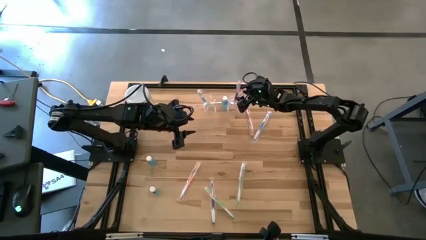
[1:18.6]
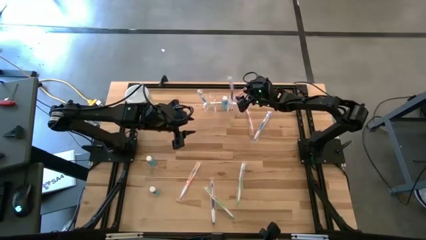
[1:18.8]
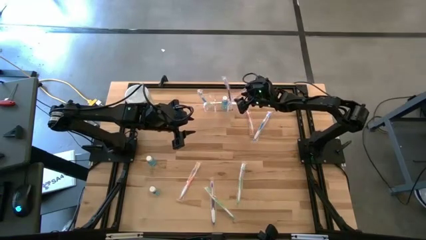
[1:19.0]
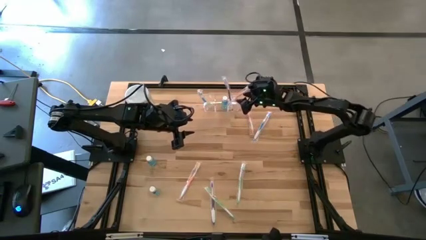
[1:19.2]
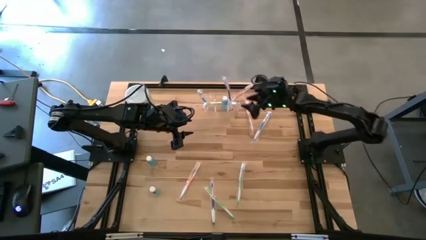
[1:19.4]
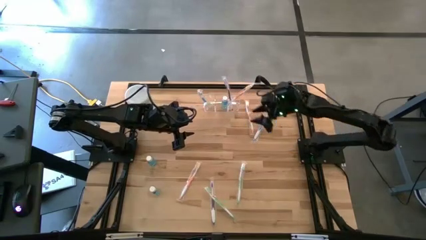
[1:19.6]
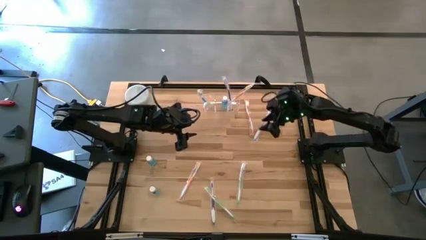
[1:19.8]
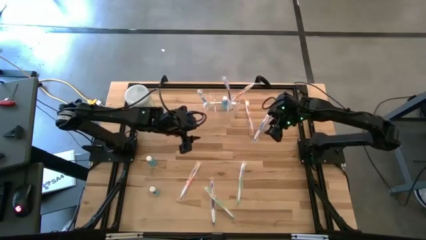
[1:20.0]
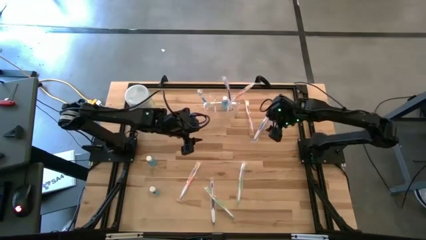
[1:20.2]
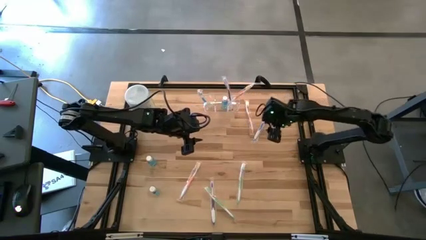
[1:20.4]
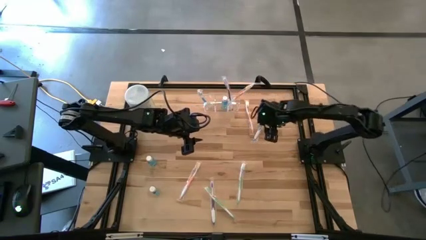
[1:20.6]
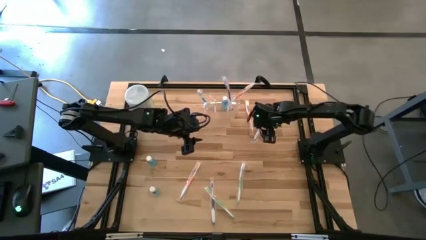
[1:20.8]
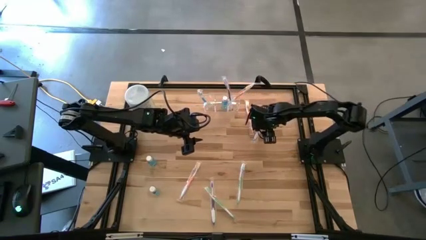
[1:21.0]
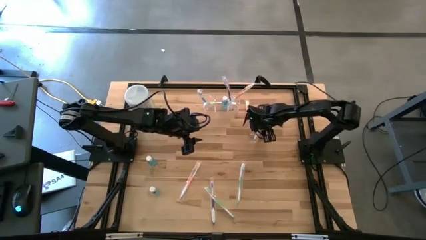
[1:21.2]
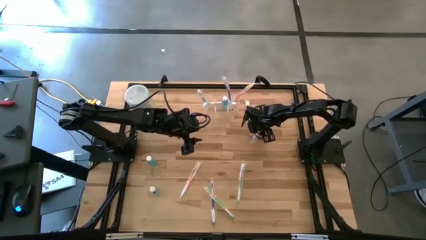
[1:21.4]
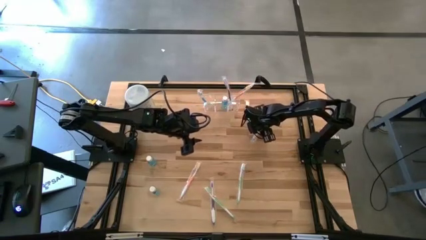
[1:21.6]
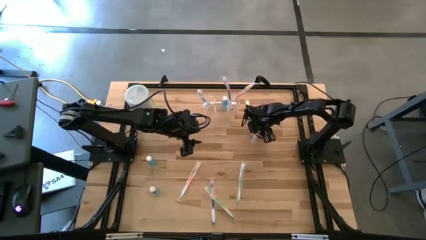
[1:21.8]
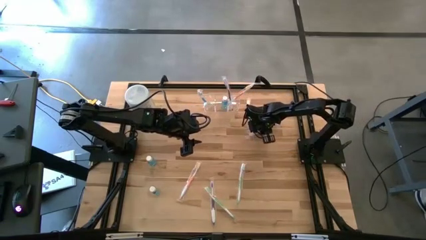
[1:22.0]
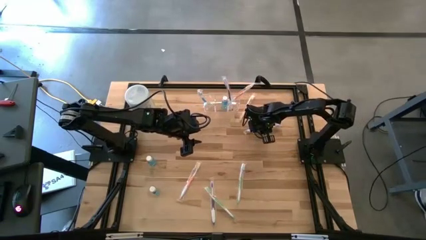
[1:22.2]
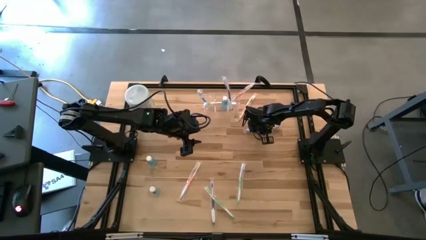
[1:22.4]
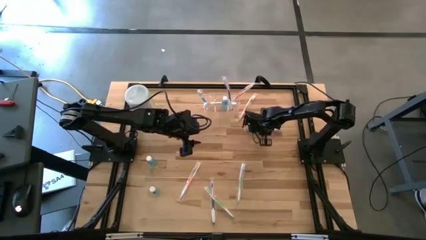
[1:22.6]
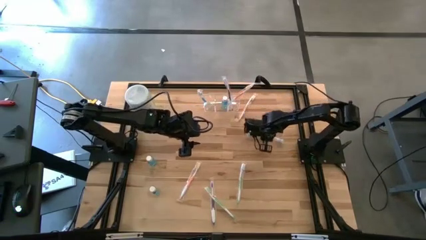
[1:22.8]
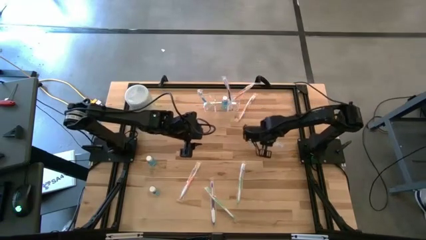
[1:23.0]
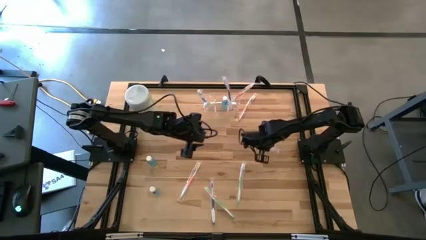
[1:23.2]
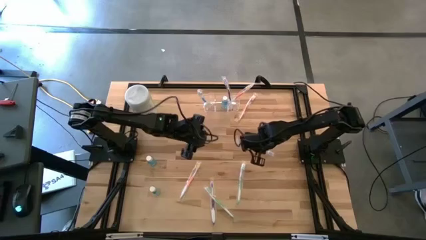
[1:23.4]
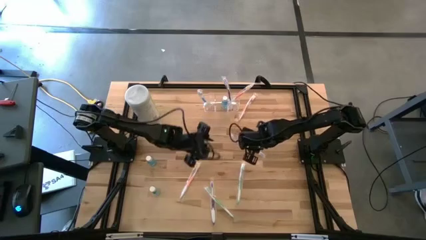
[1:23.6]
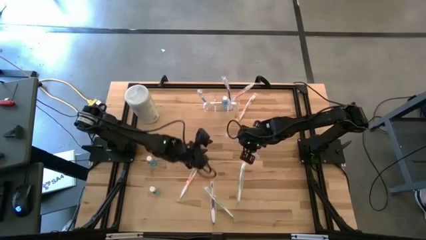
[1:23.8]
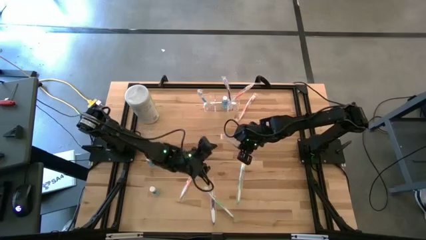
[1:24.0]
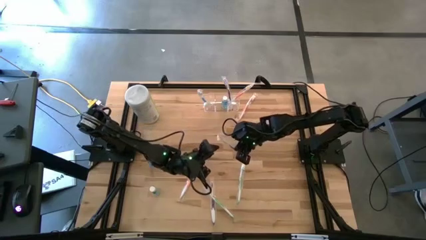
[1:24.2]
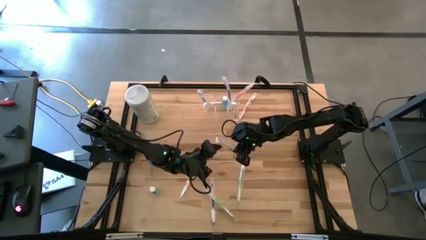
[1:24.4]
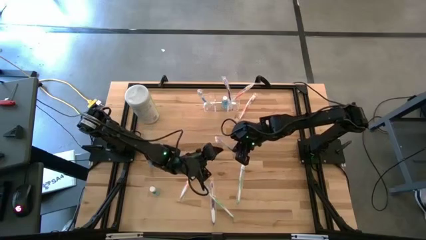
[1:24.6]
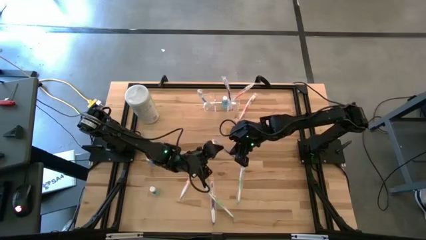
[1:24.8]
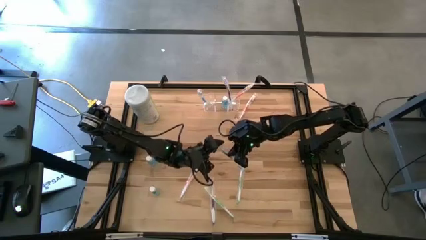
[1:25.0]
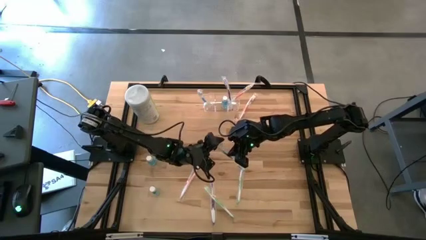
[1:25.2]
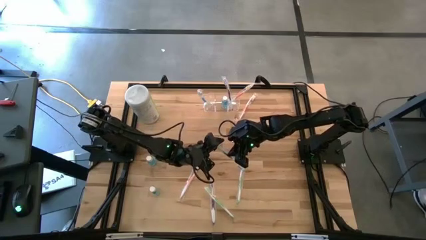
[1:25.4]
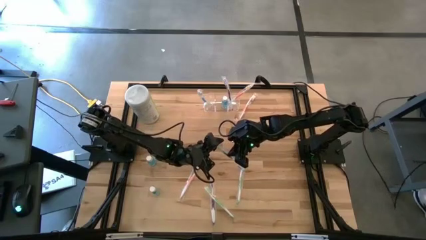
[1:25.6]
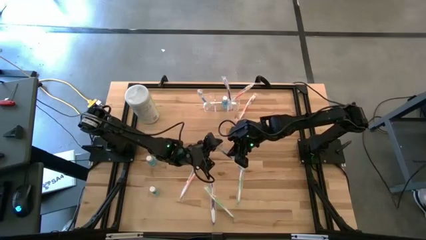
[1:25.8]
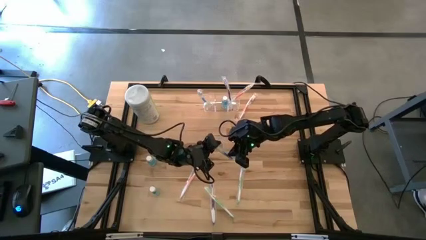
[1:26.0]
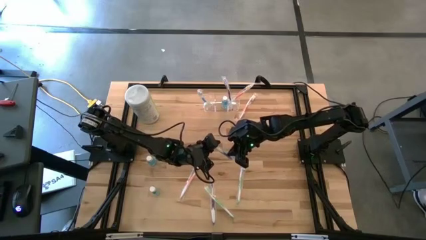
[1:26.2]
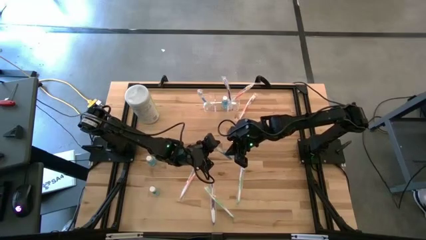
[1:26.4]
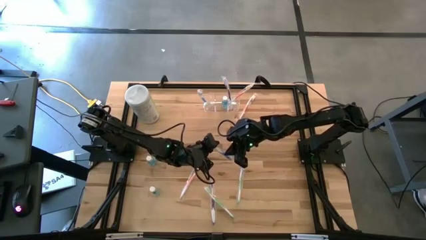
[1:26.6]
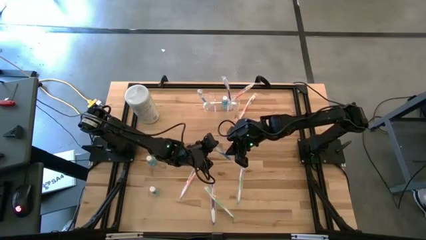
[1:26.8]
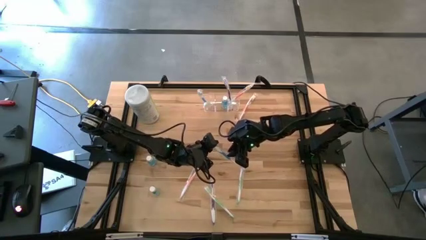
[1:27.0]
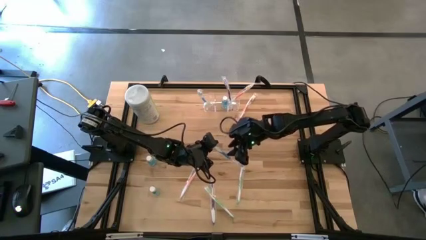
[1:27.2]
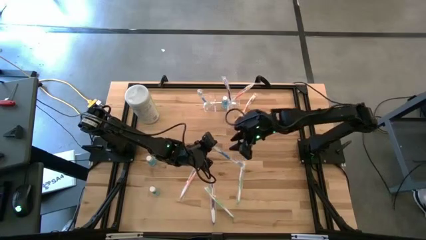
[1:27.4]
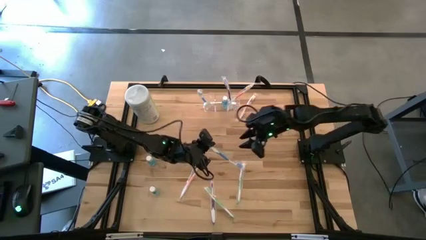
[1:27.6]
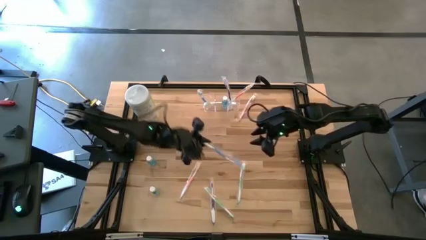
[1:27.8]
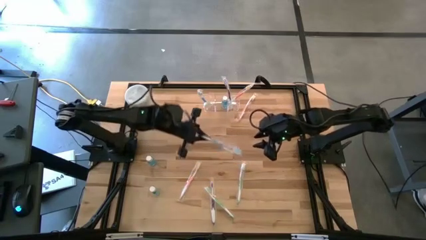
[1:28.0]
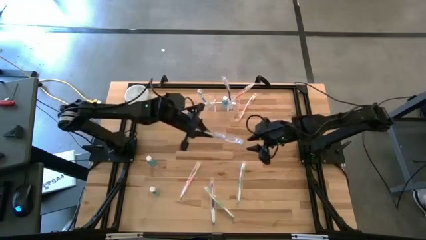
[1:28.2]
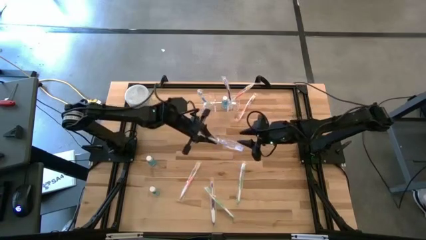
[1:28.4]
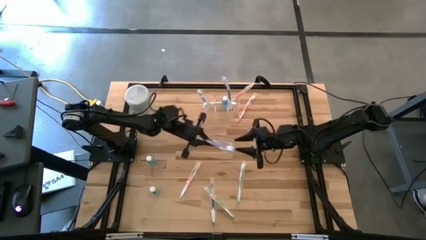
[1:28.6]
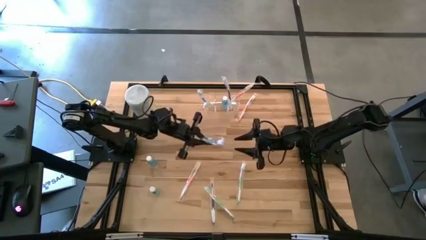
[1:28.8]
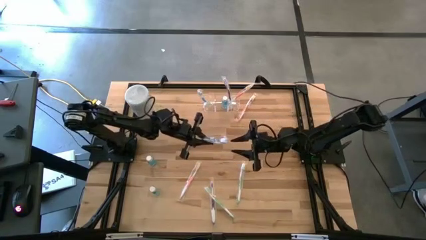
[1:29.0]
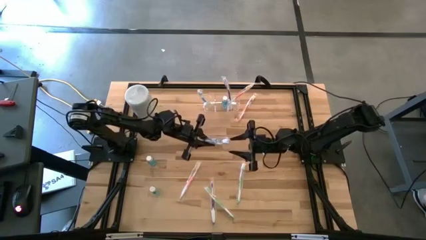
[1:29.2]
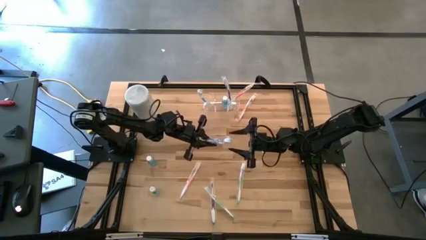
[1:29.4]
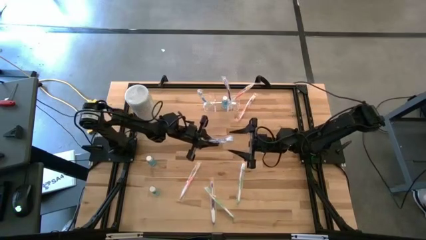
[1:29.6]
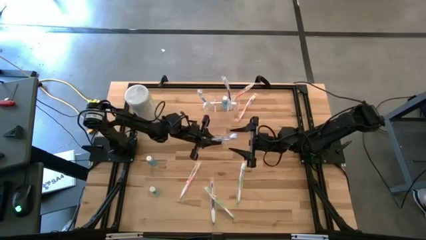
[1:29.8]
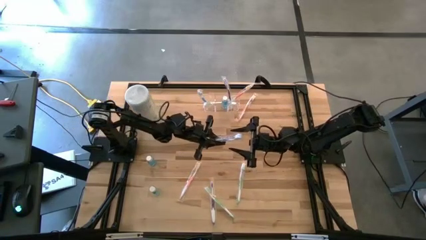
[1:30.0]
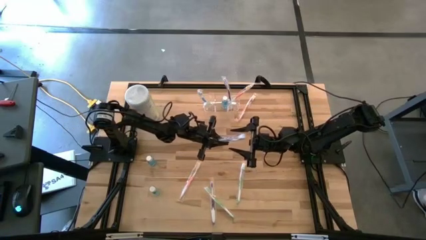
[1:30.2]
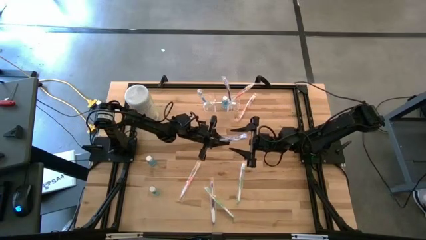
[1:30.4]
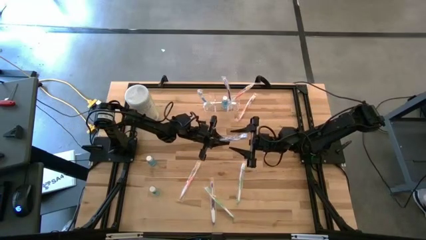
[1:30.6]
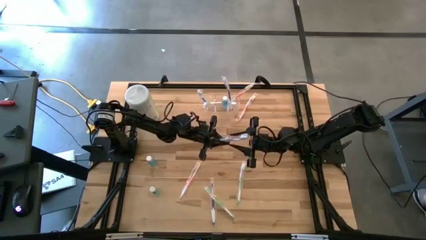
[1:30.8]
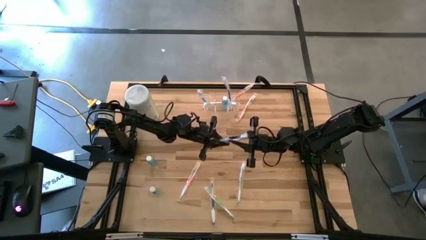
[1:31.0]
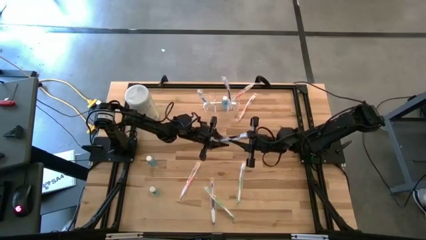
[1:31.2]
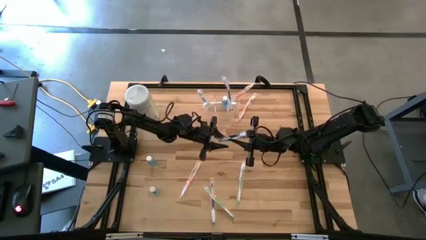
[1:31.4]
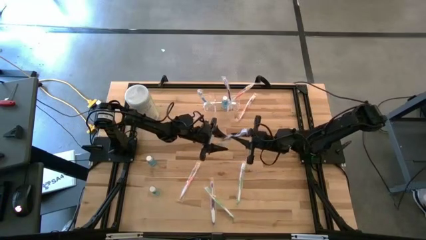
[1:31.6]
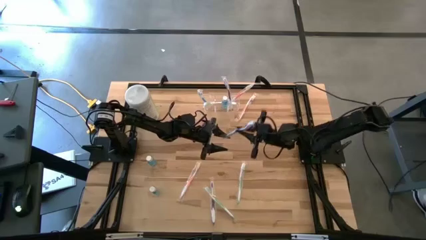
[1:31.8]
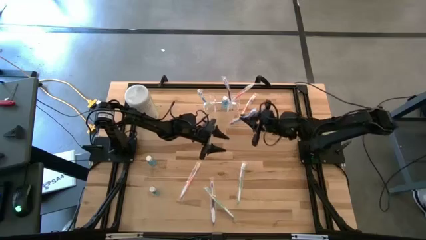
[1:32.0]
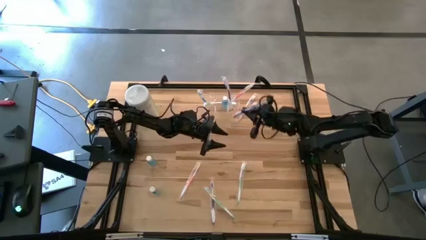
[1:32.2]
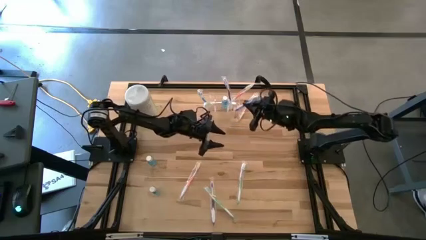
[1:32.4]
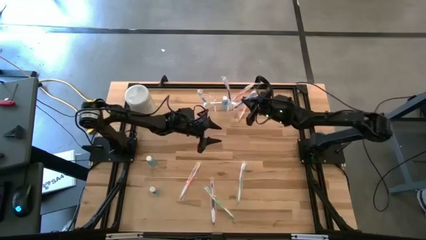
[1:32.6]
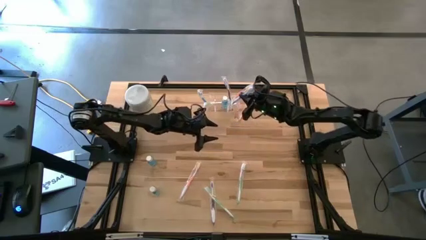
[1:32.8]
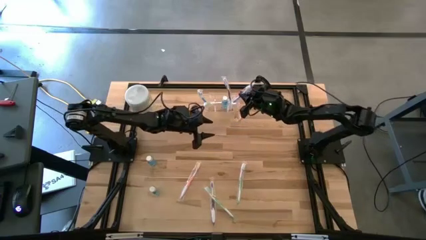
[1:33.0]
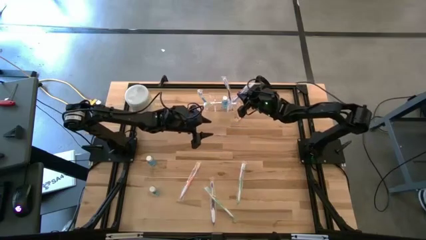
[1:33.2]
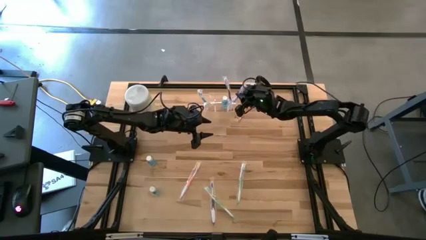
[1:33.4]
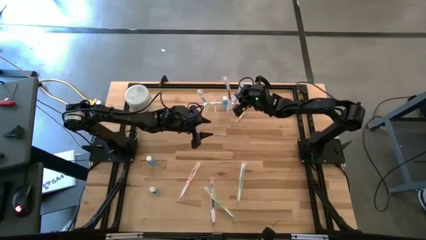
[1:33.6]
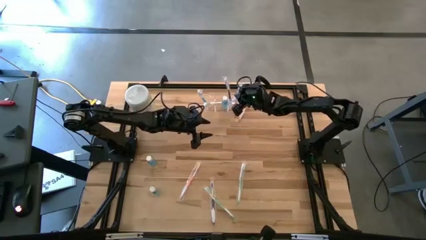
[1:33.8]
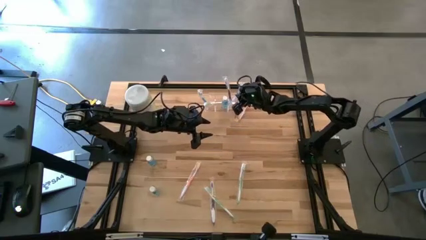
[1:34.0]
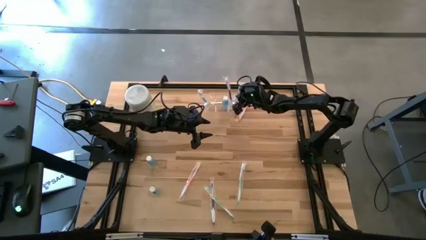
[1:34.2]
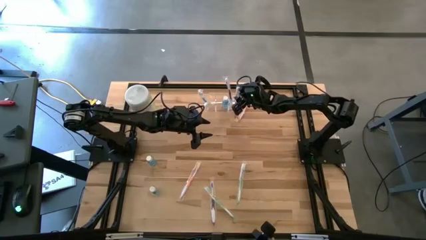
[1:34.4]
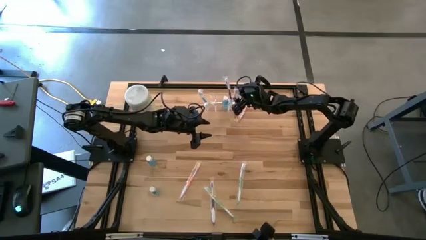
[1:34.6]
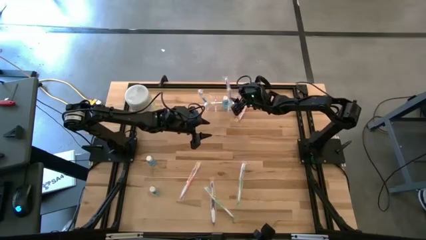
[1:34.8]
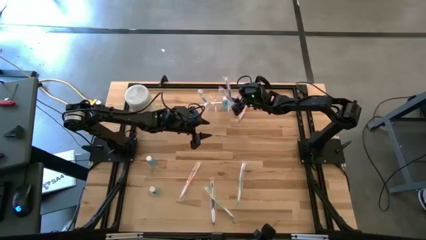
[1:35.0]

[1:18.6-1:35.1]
Task: Pick & Place toothbrushing station
Put the blue toothbrush into the transparent organizer
